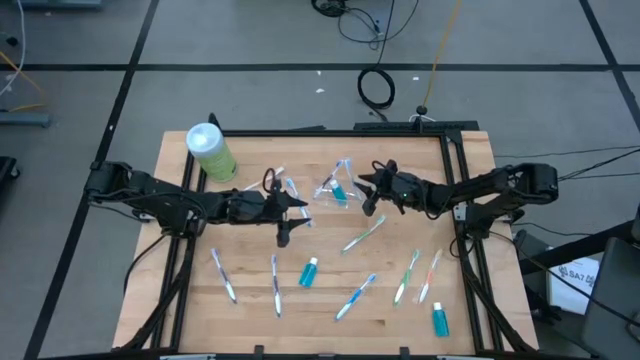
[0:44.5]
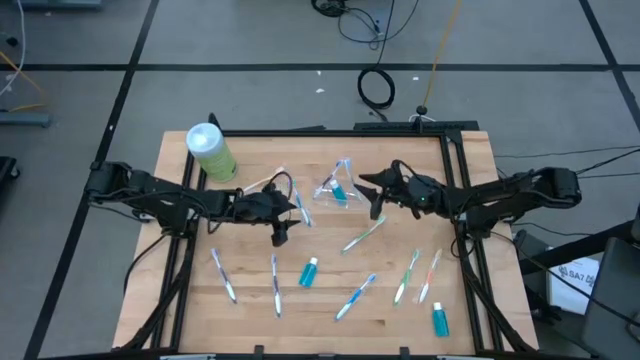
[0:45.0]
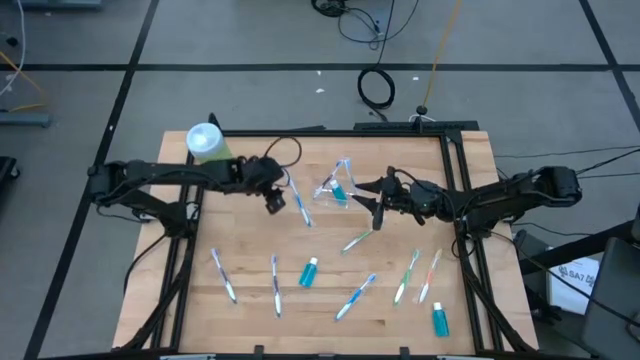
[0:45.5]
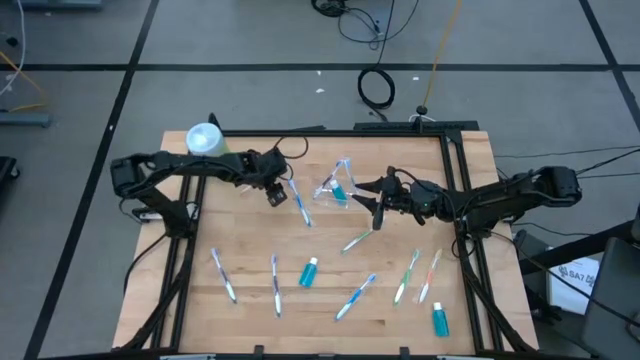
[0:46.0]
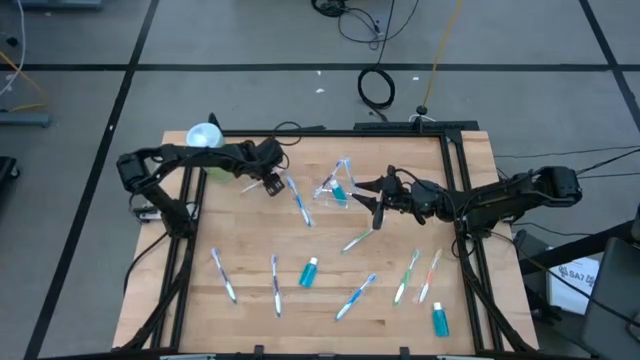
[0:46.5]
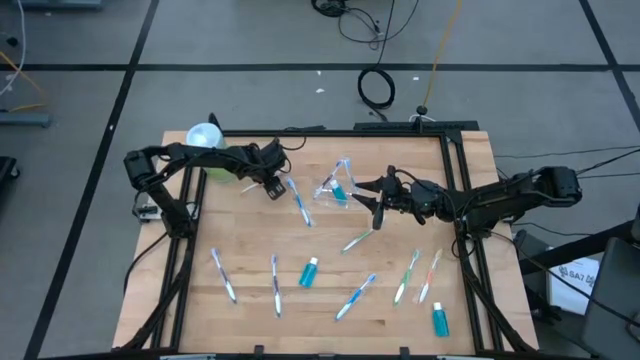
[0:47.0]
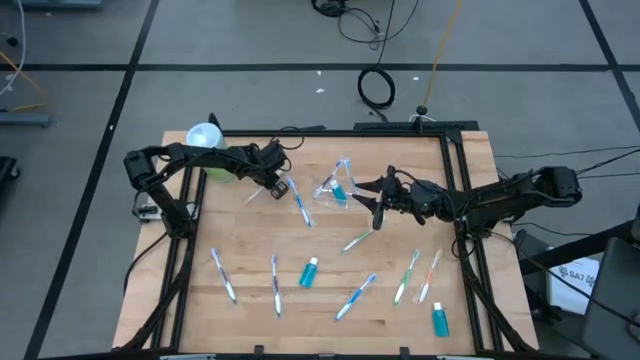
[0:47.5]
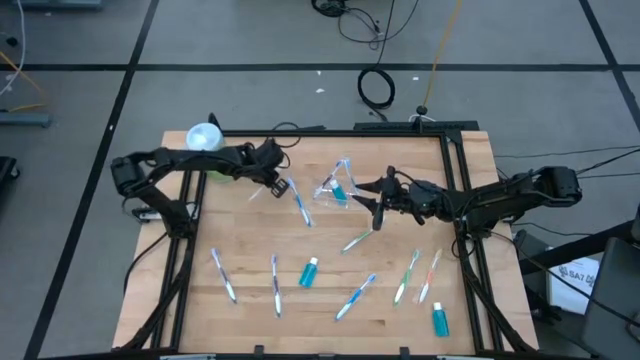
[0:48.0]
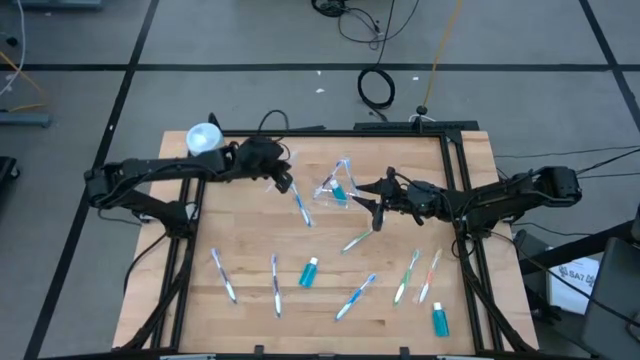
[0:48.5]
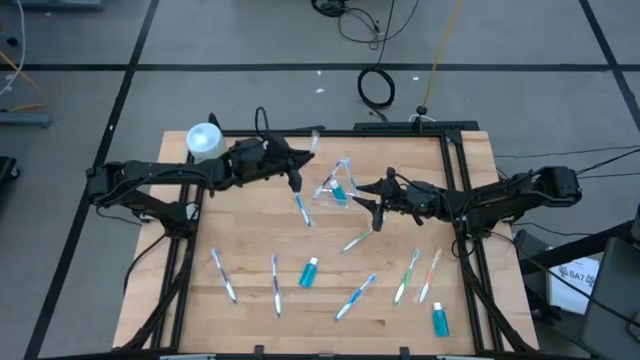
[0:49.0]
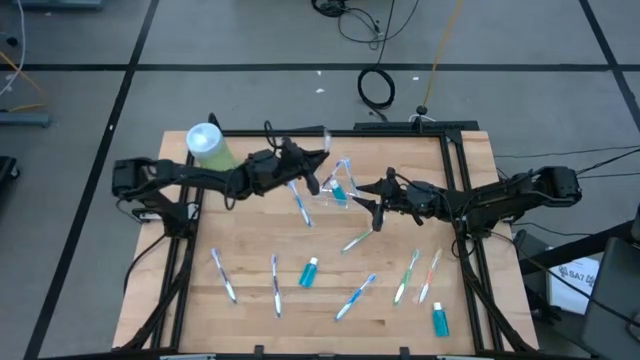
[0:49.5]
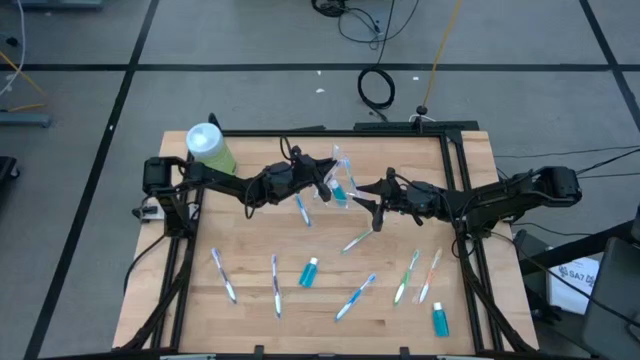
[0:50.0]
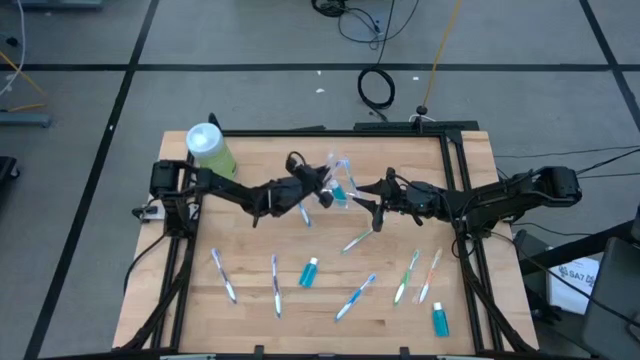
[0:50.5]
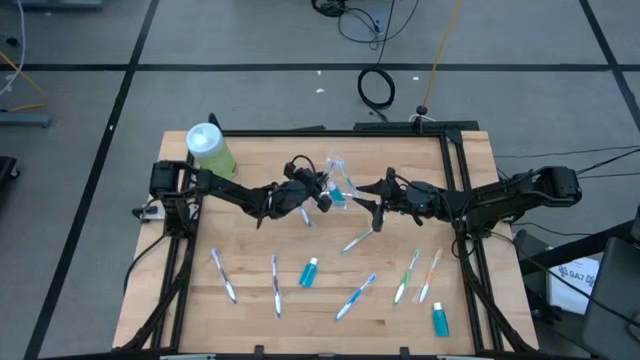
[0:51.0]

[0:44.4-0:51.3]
Task: Pick & Place toothbrushing station
Put the top left orange toothbrush into the left section of the transparent organizer

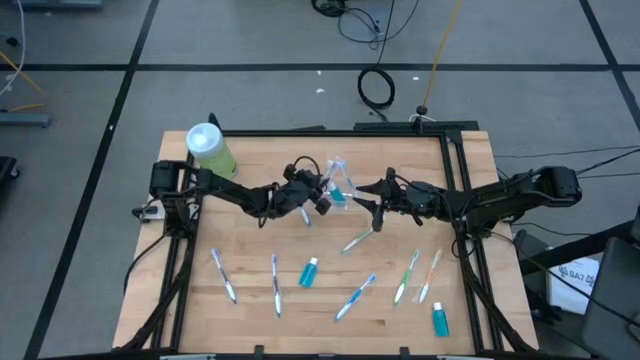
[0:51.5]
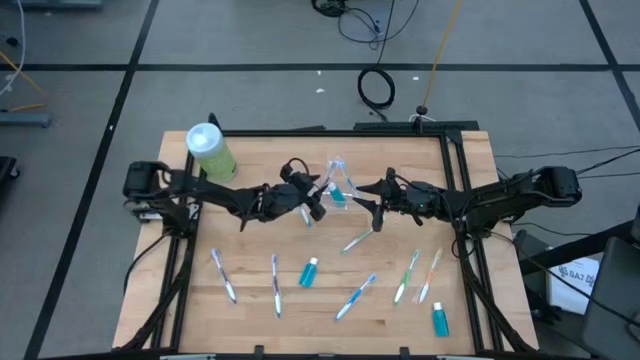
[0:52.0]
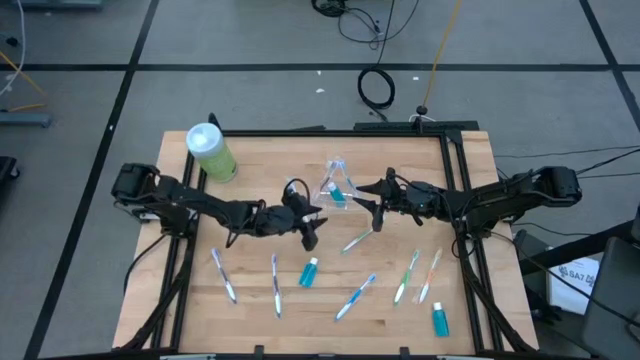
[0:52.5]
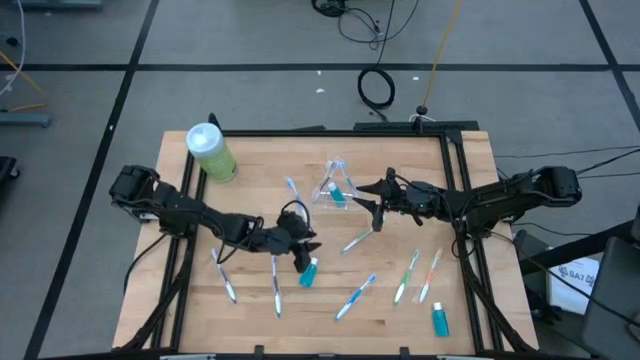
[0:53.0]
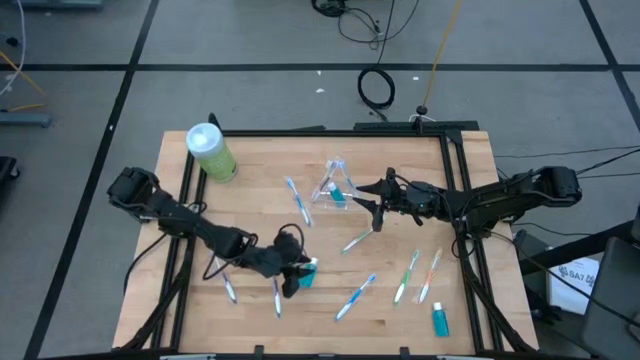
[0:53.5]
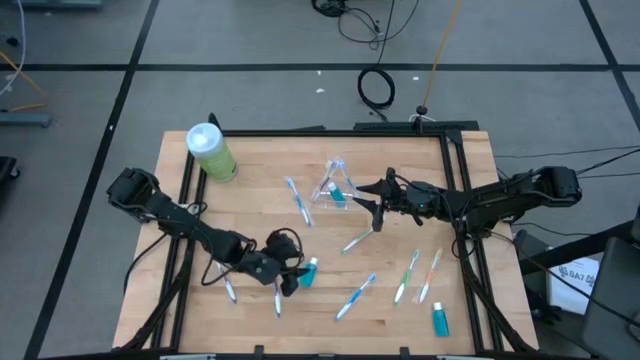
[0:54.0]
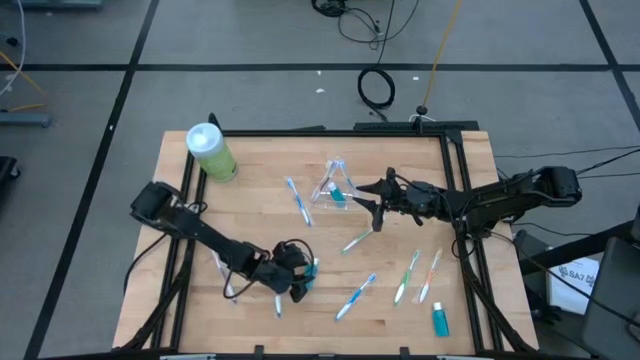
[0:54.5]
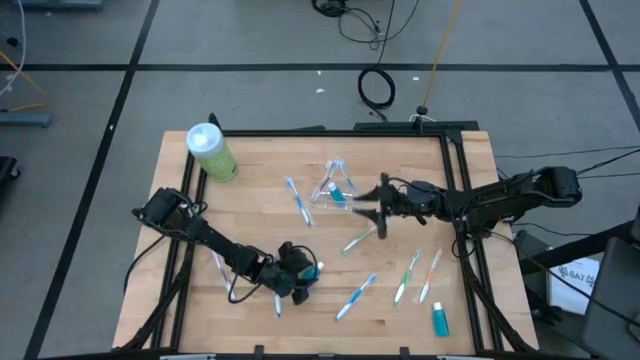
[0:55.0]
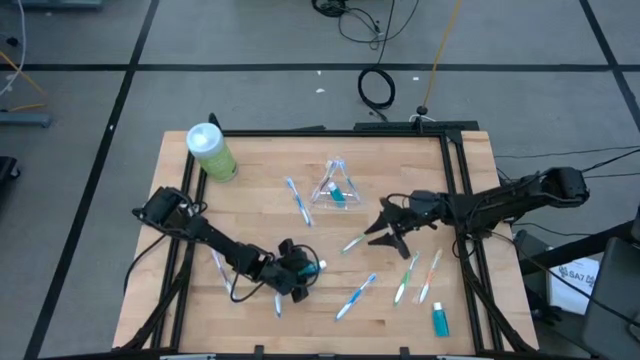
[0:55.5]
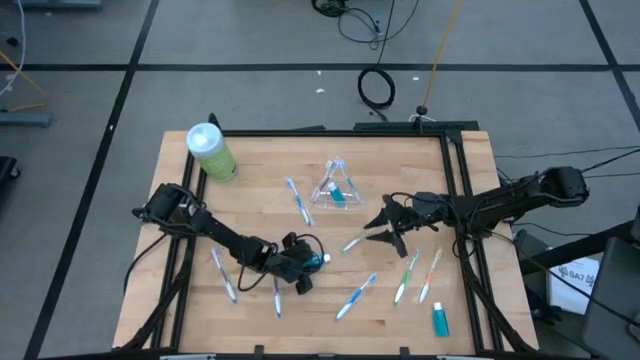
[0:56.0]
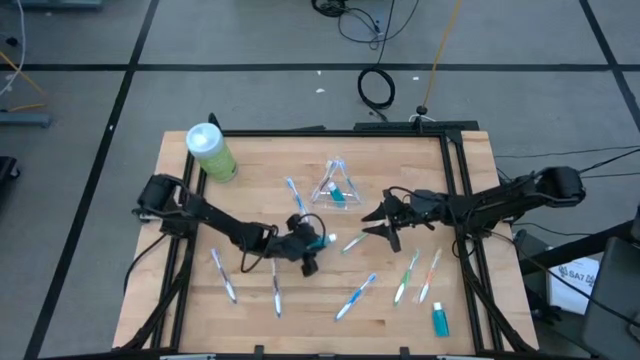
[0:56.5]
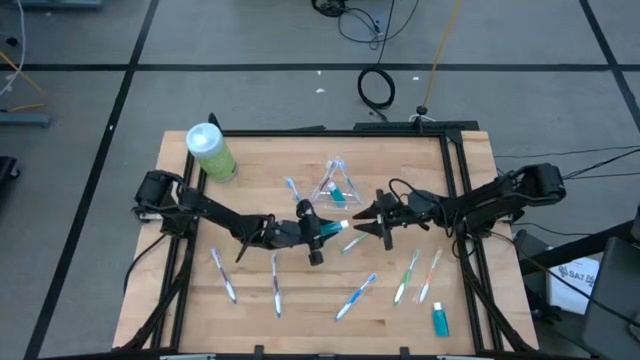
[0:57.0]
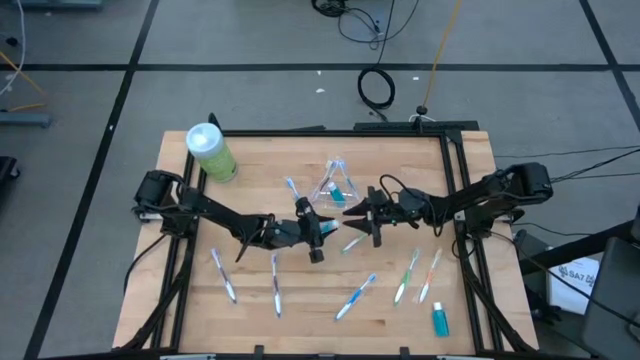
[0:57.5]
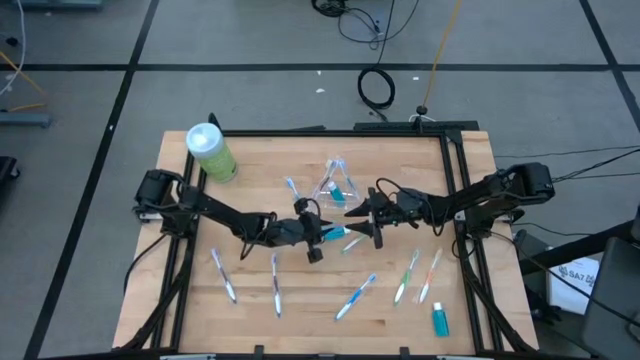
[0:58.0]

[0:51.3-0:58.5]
Put the left small mouthwash bottle into the middle section of the transparent organizer

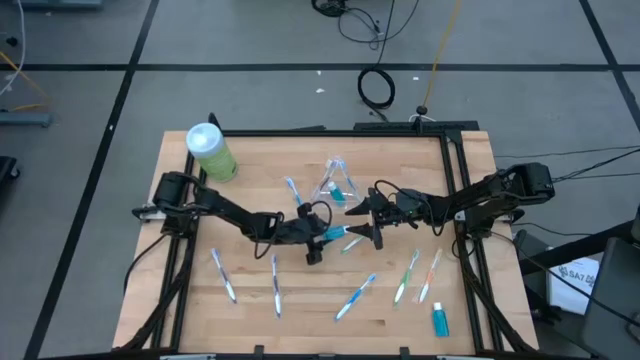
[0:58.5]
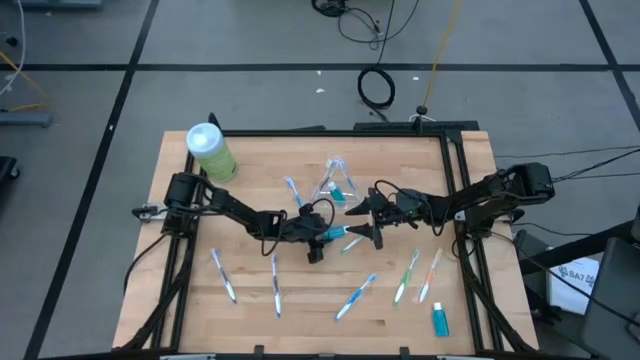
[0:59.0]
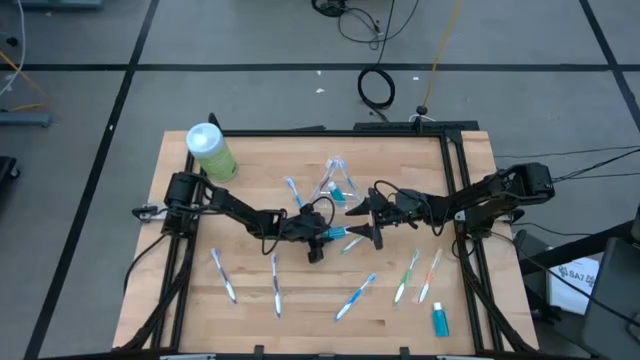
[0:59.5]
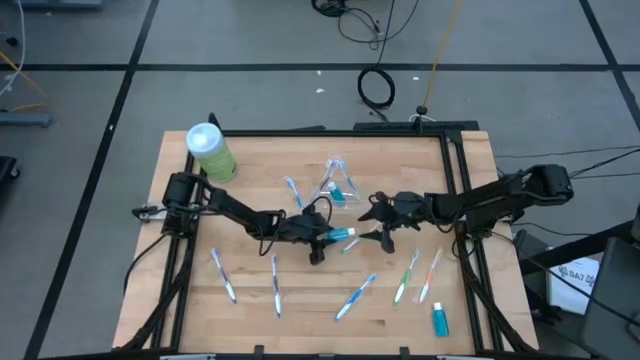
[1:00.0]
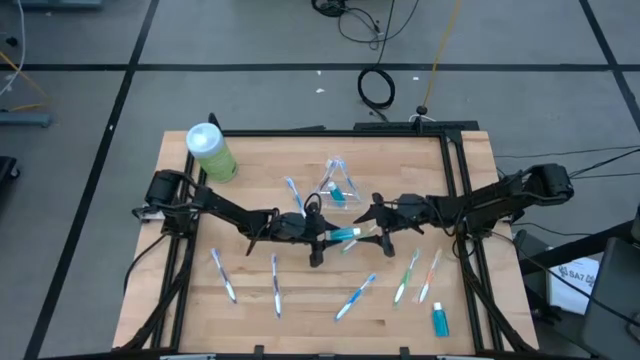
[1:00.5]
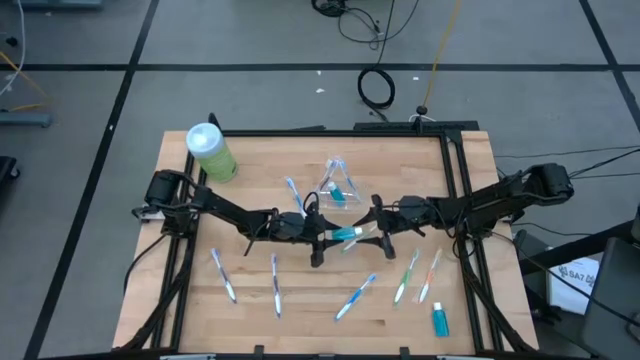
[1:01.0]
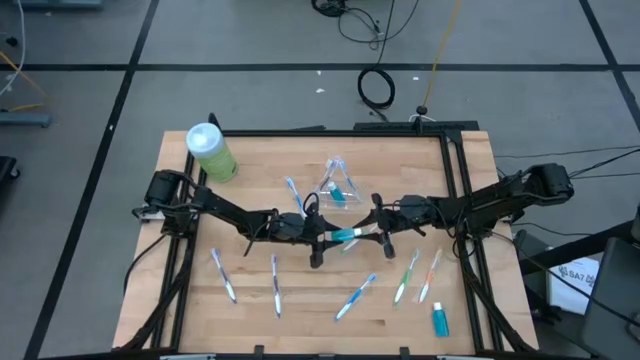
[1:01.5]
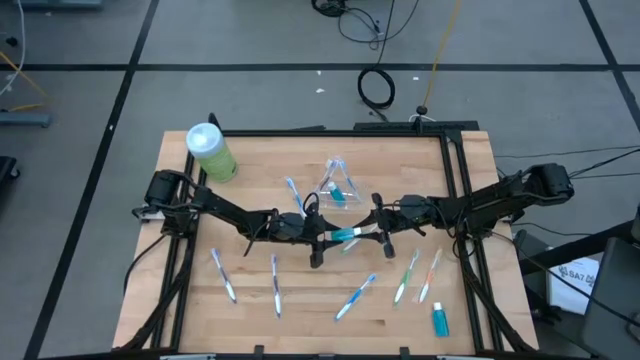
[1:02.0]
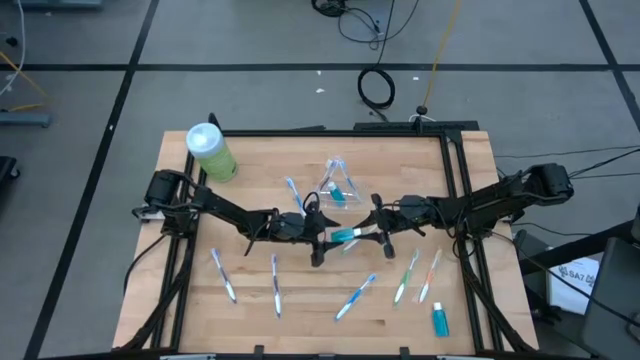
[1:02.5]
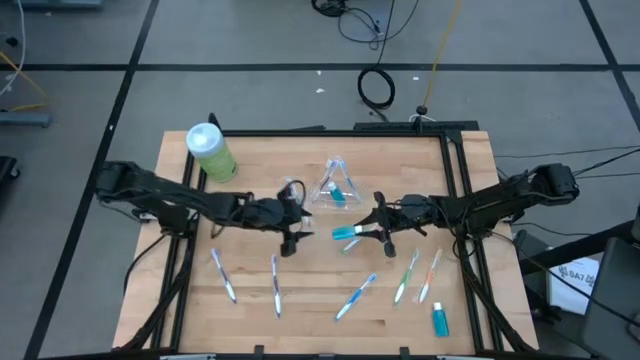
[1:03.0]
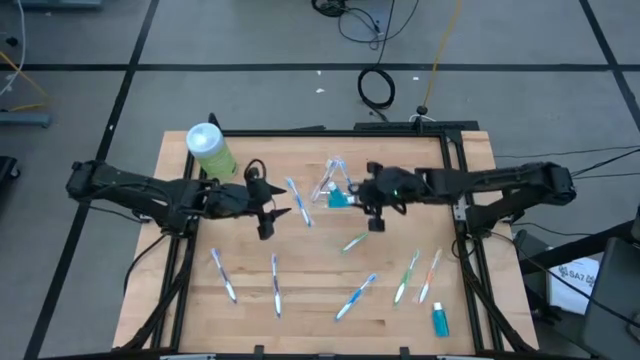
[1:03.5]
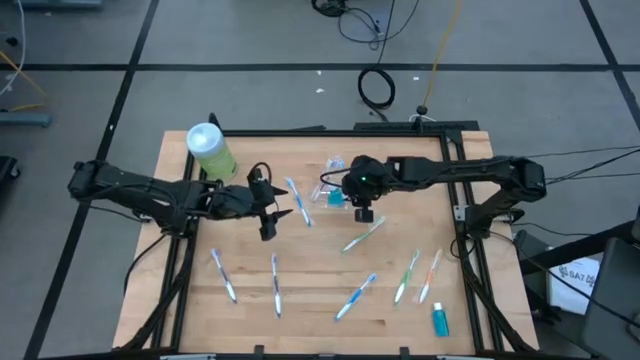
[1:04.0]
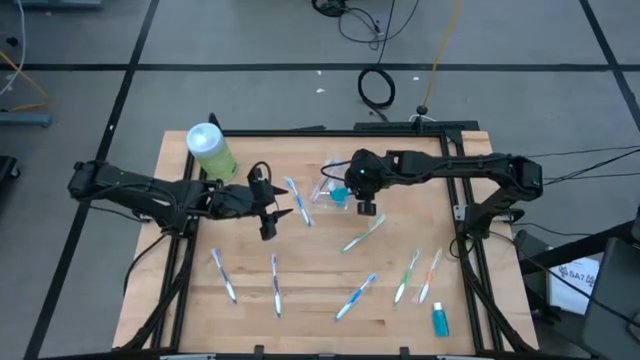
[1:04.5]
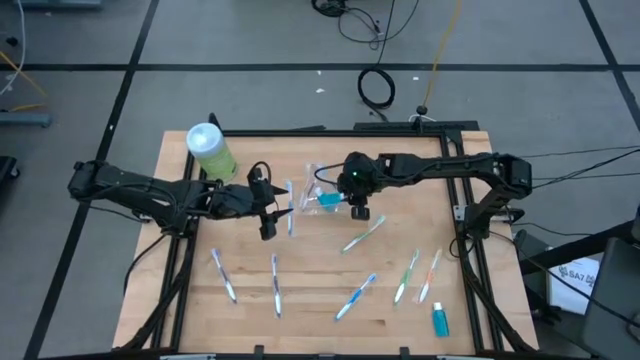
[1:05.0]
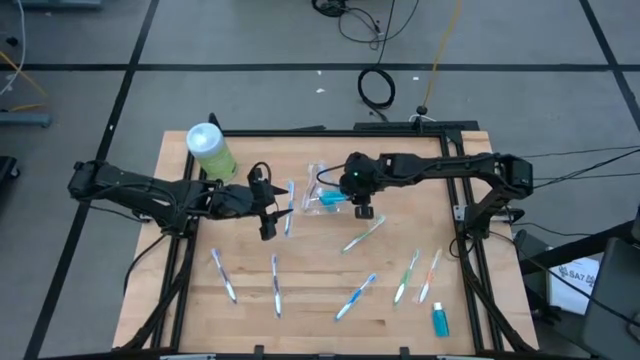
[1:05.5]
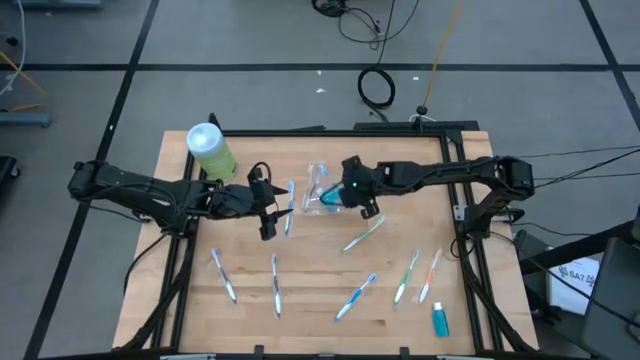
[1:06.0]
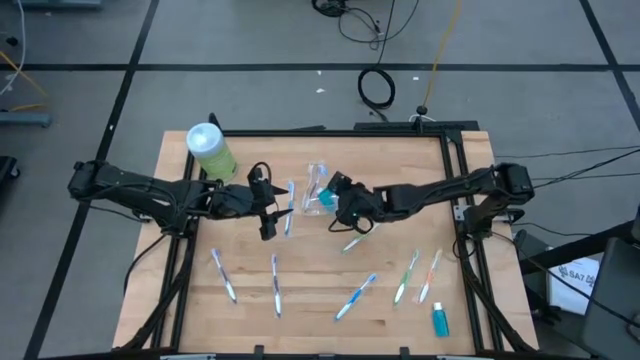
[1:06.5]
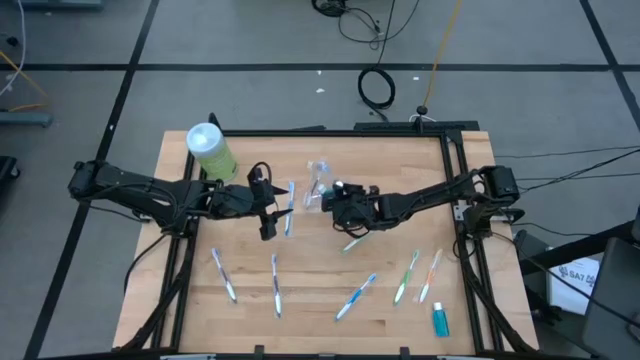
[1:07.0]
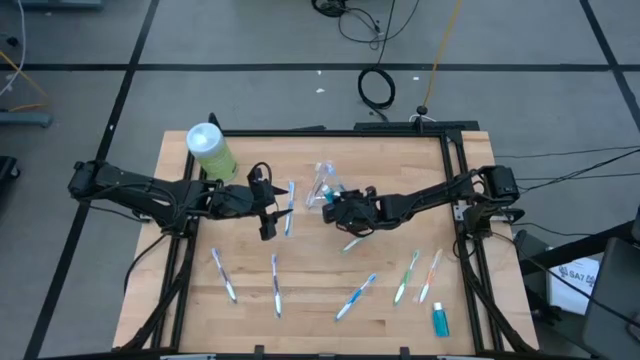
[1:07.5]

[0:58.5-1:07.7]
Put the left small mouthwash bottle into the middle section of the transparent organizer
